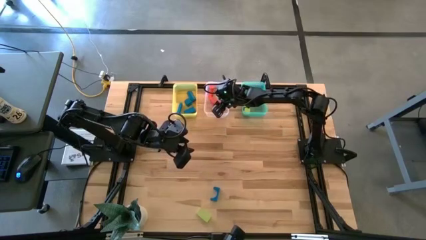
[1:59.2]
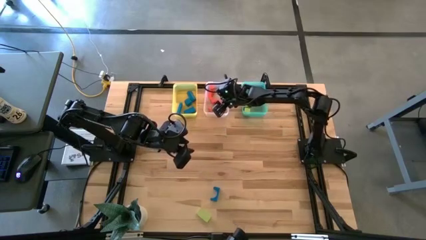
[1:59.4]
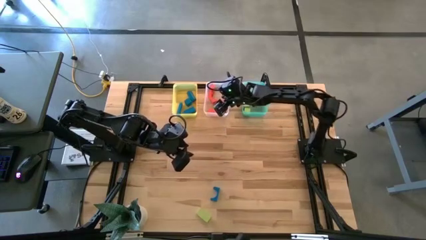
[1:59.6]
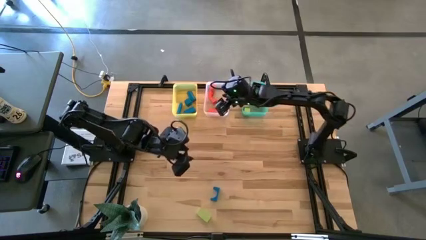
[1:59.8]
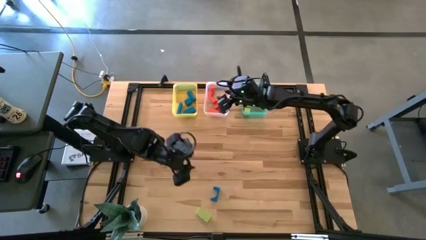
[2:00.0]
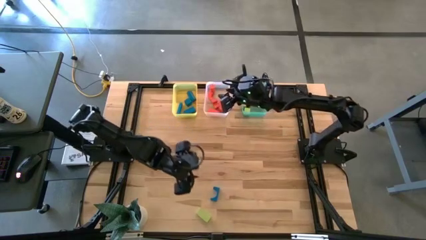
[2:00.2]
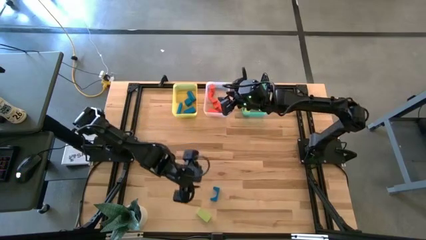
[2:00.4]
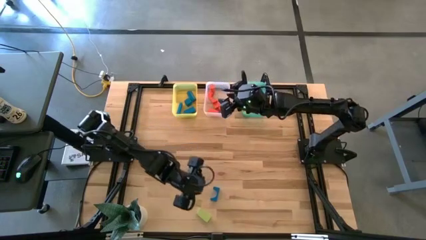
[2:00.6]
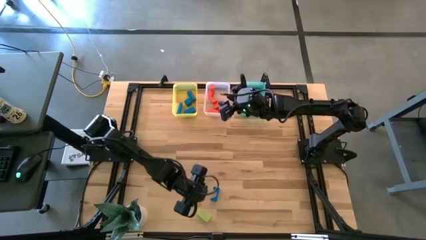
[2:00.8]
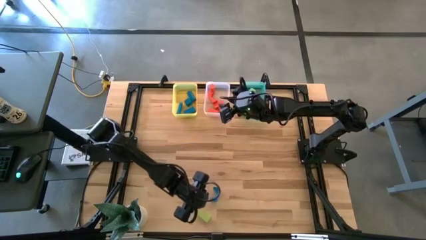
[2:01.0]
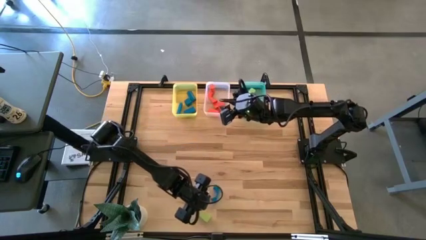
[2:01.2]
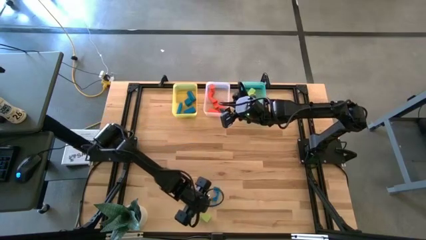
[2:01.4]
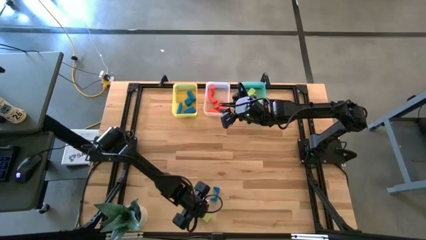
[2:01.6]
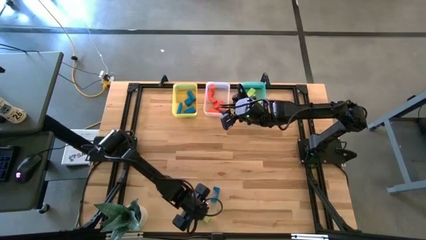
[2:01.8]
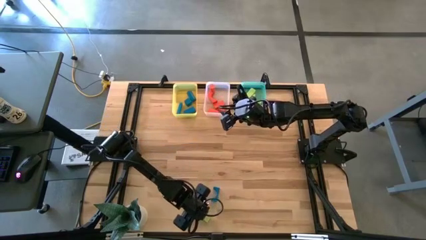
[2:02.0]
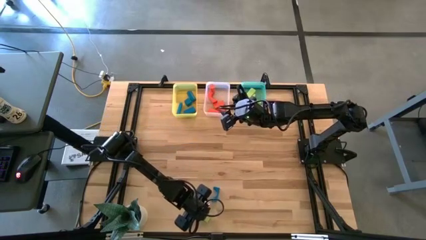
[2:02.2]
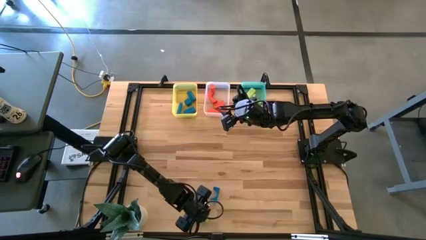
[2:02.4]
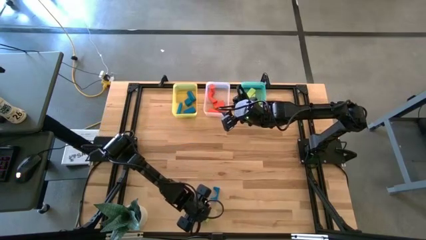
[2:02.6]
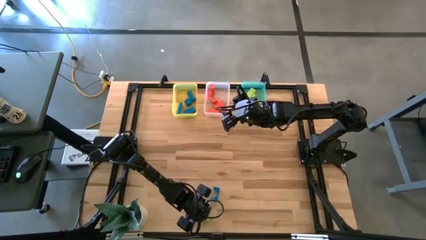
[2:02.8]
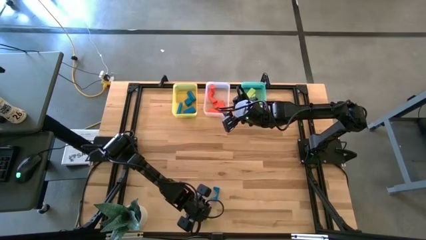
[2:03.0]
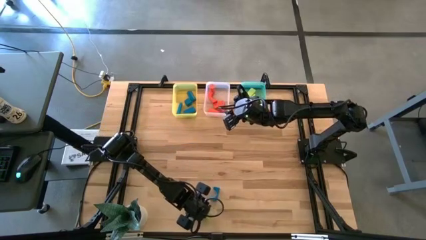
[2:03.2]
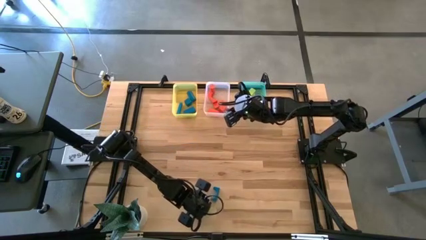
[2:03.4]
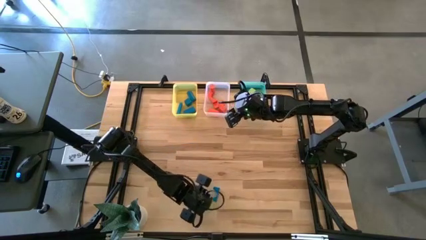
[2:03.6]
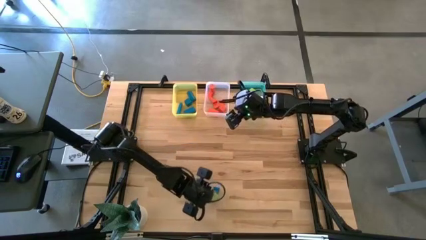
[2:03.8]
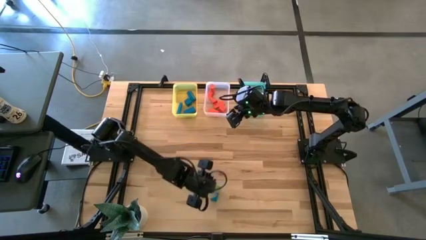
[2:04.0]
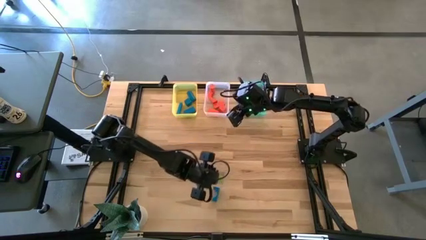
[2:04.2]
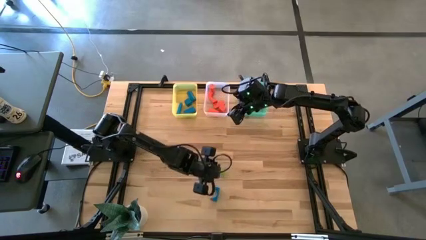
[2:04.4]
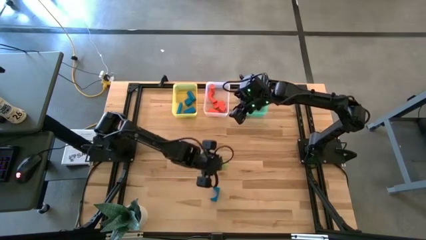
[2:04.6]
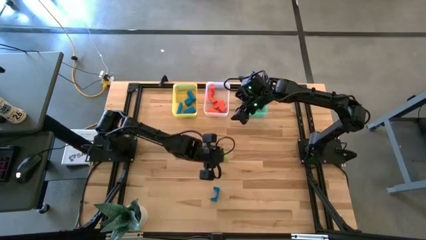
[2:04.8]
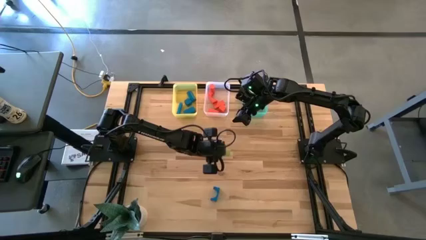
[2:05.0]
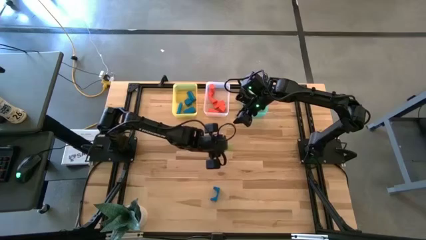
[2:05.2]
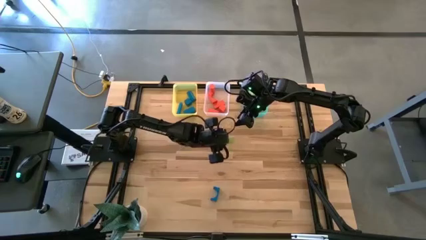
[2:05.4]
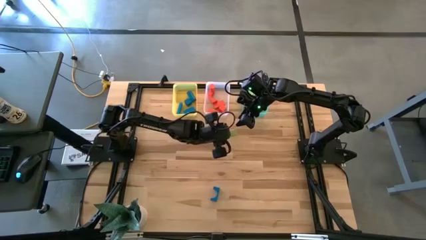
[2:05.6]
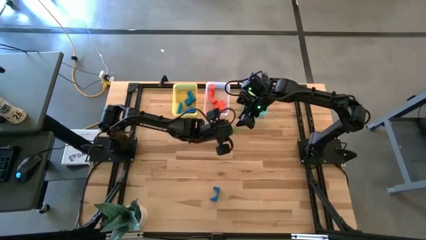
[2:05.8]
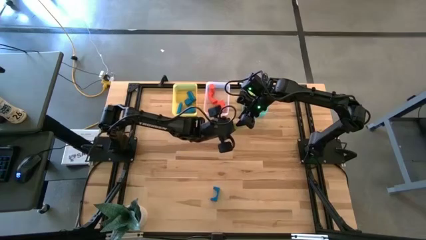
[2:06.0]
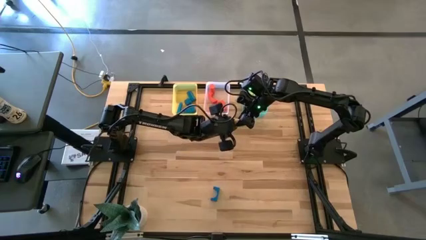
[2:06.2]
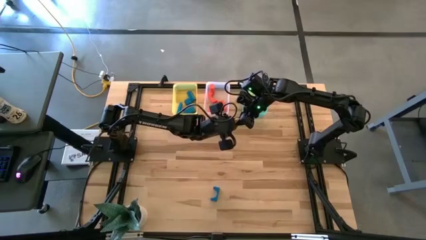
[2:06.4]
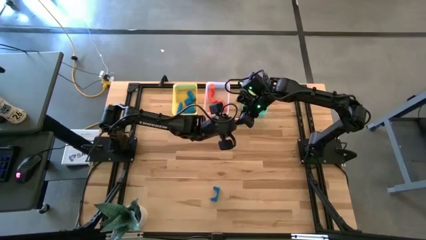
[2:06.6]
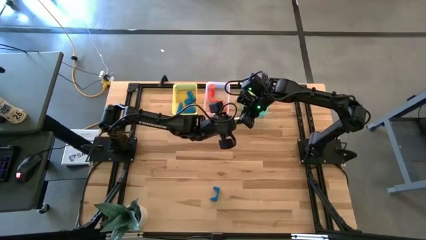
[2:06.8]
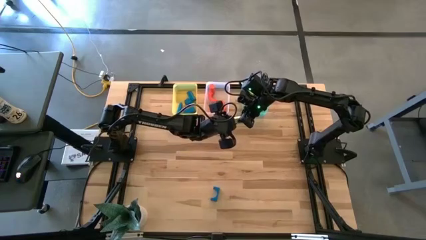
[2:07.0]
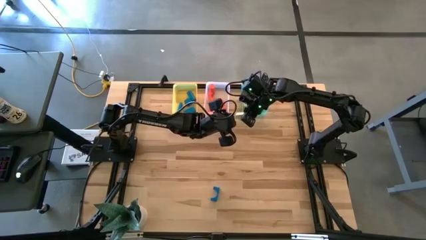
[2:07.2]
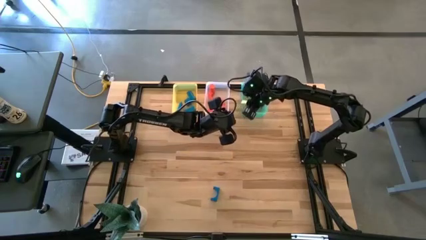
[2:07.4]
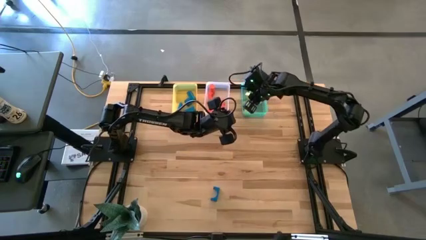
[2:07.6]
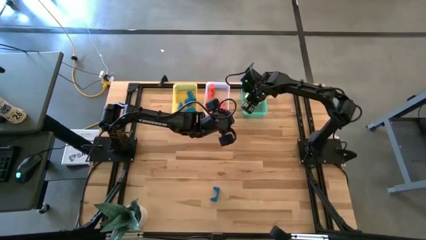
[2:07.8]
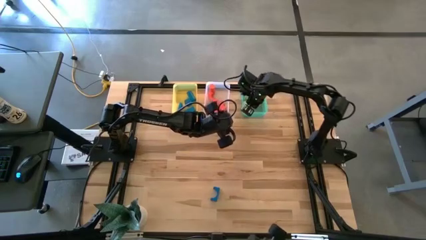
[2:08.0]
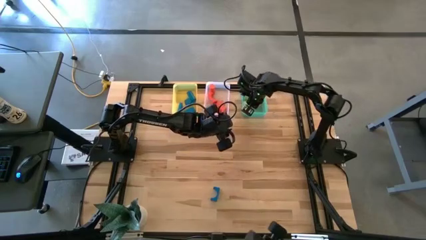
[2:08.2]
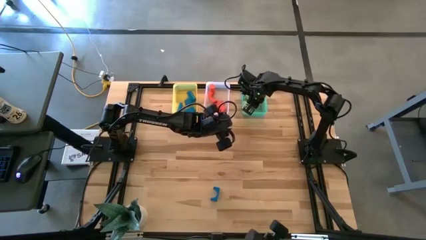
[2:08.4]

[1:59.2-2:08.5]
Task: Sort & place blocks by color
Put the green block into the blue bin

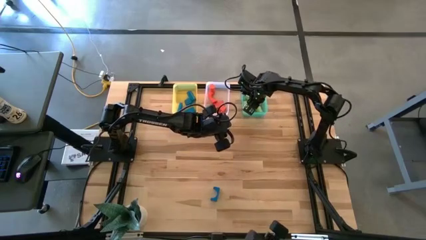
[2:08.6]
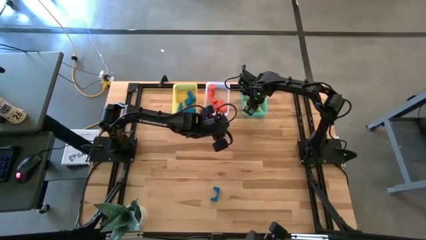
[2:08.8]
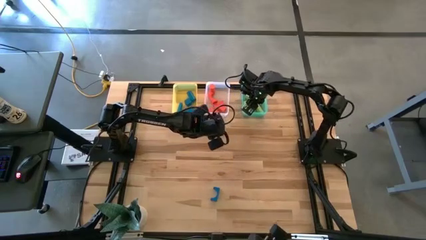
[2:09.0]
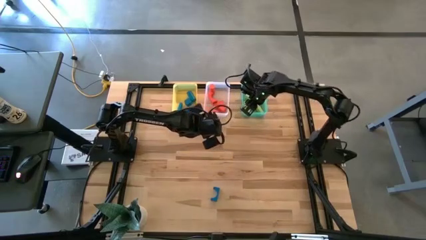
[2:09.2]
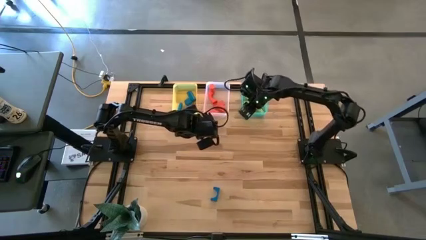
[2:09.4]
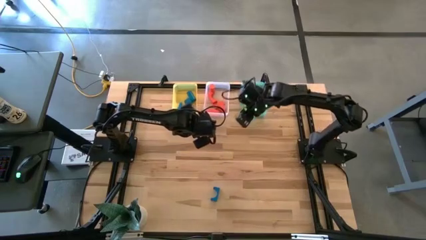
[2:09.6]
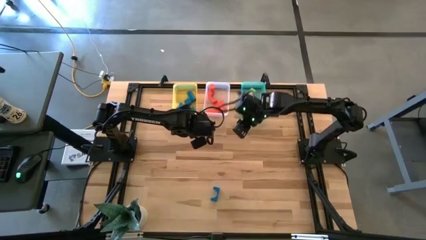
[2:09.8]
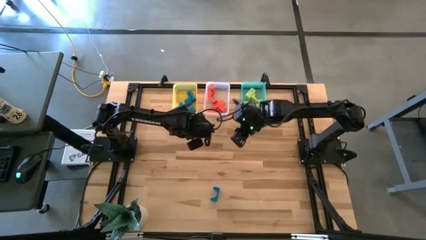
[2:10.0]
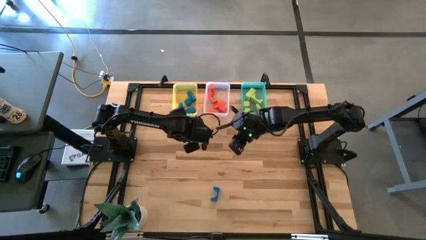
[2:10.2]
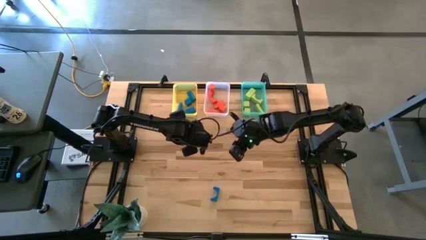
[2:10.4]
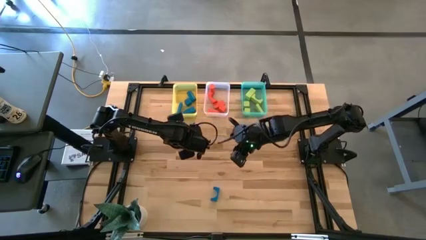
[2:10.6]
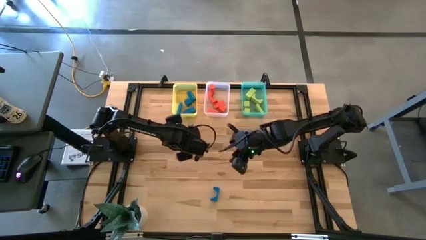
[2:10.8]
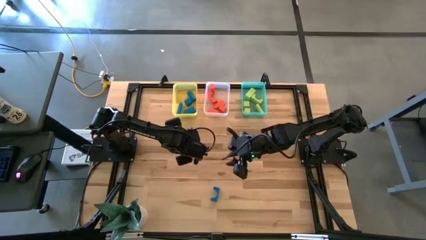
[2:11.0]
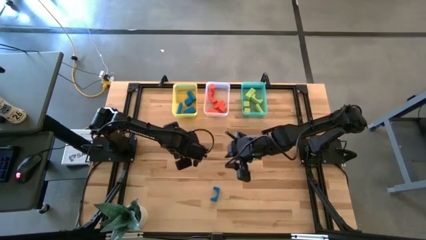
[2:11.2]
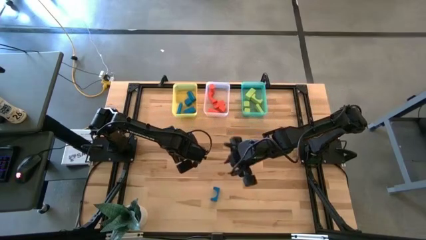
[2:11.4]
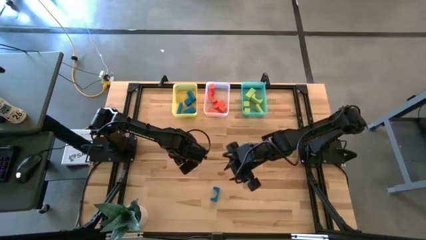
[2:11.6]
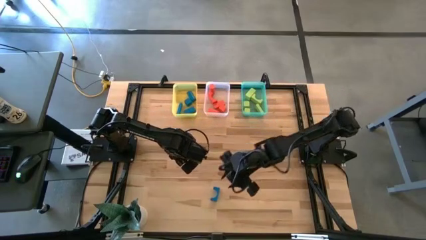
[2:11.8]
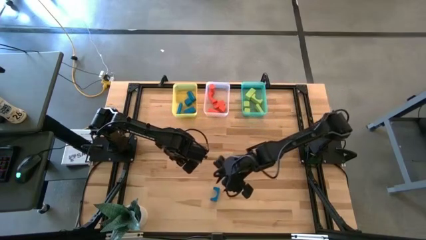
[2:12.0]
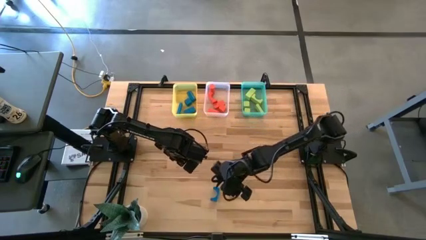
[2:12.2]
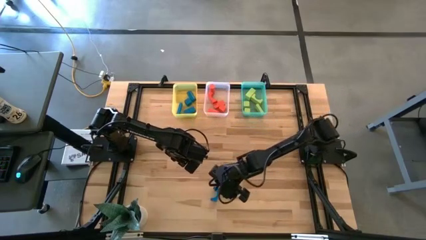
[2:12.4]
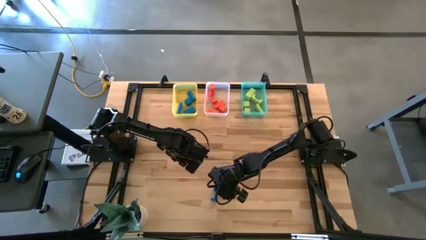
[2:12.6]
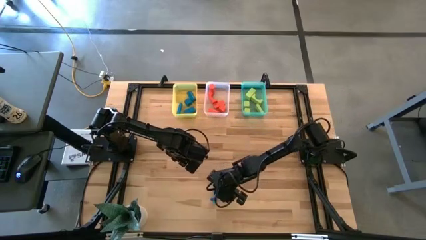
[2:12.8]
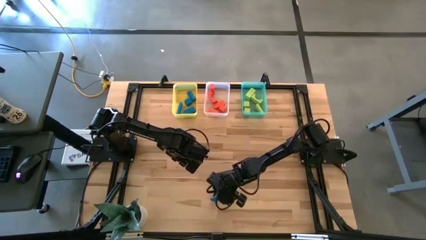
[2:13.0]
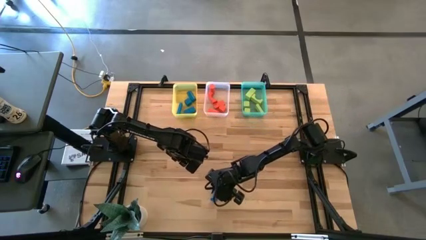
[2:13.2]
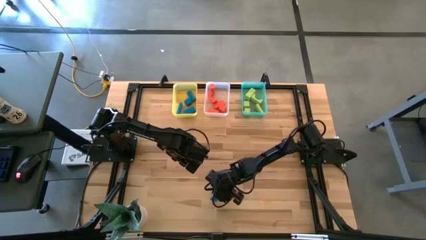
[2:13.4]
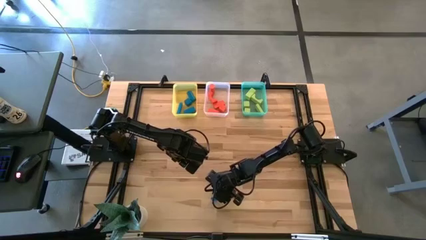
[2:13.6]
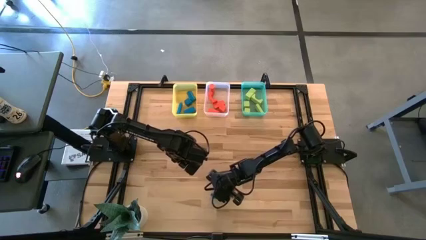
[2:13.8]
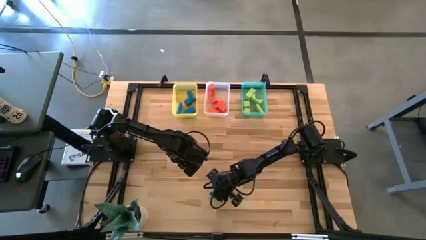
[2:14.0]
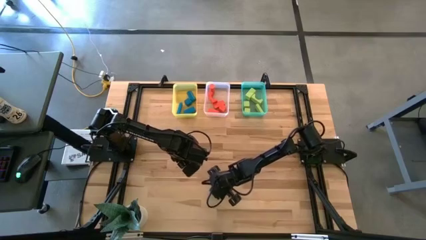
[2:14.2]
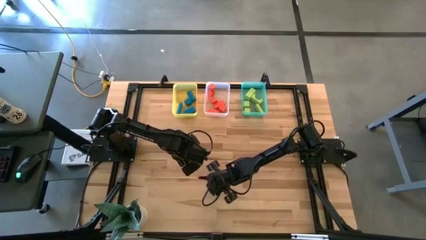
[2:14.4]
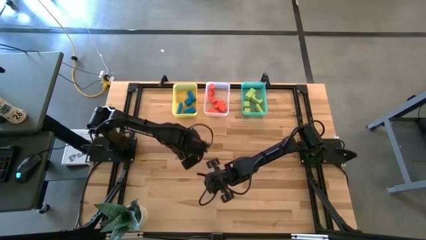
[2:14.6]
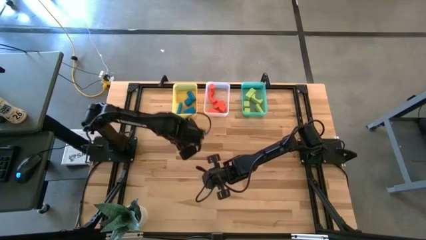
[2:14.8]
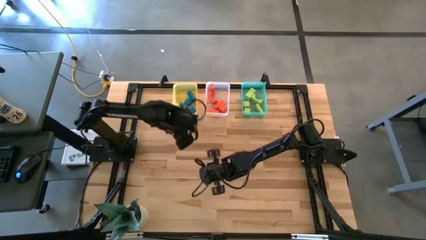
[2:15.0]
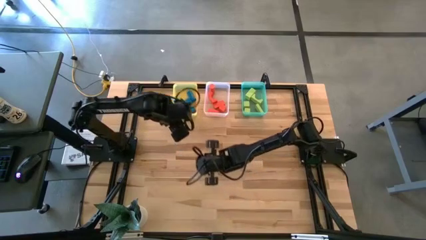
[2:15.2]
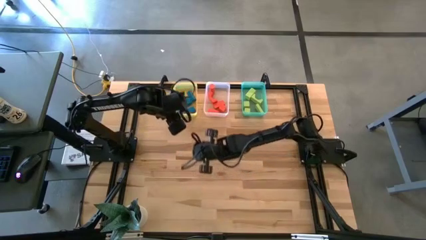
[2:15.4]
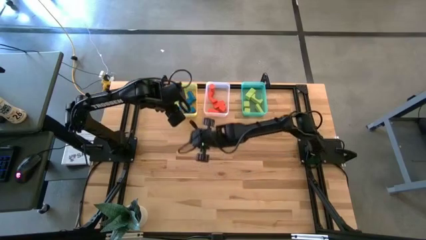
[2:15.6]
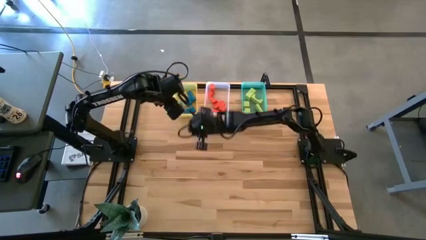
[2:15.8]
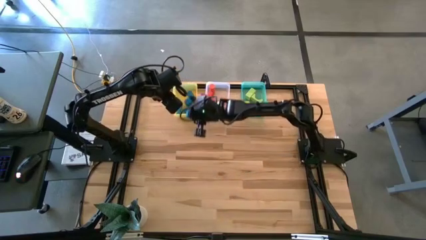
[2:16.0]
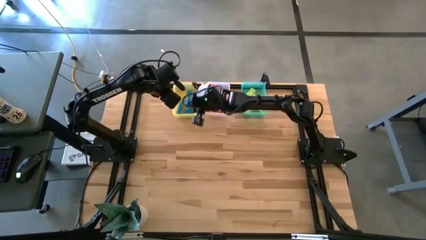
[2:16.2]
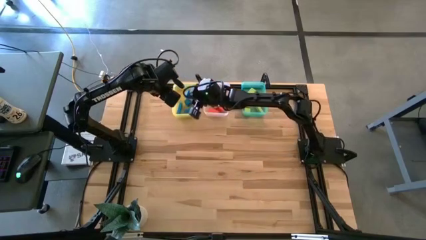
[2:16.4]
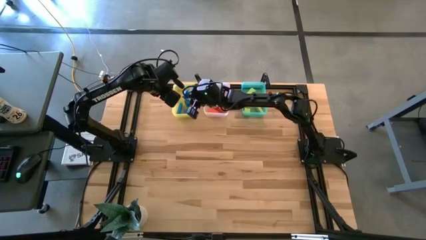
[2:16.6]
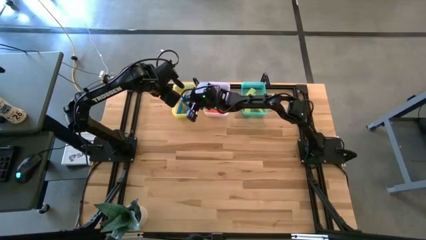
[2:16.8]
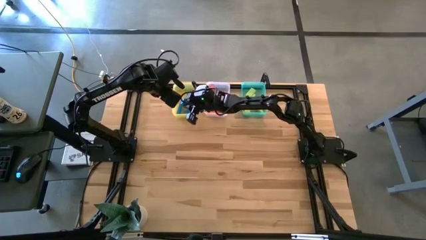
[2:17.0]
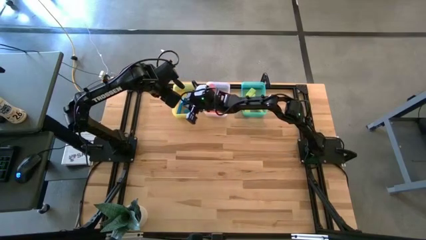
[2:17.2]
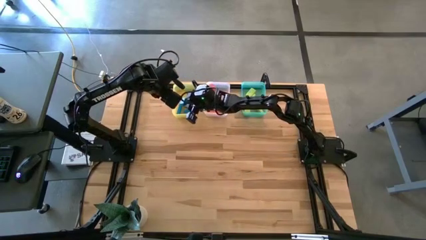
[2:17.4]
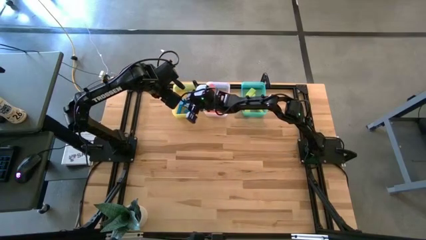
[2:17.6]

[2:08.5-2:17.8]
Put the blue block into the yellow bin
